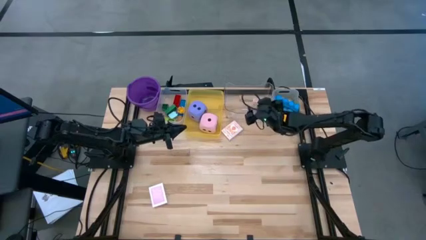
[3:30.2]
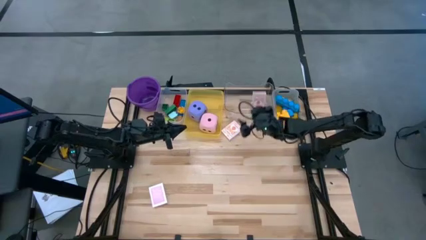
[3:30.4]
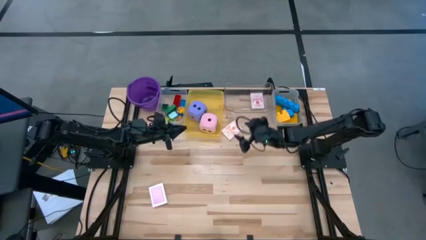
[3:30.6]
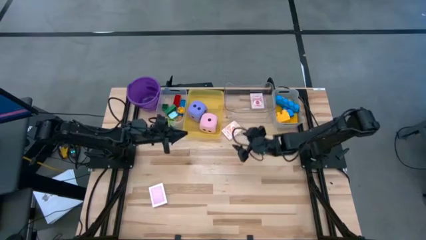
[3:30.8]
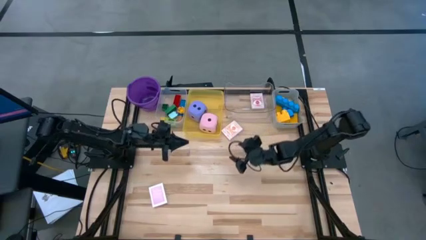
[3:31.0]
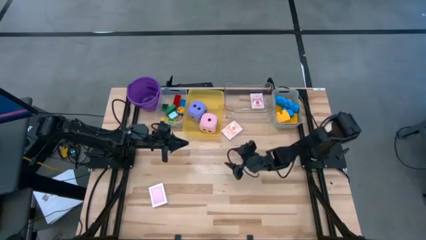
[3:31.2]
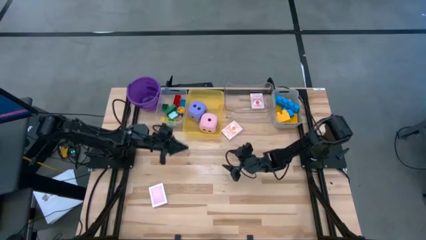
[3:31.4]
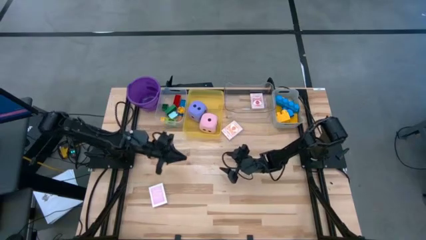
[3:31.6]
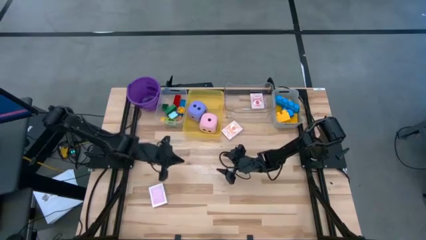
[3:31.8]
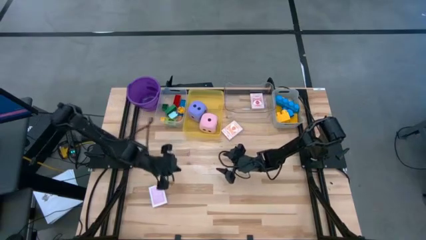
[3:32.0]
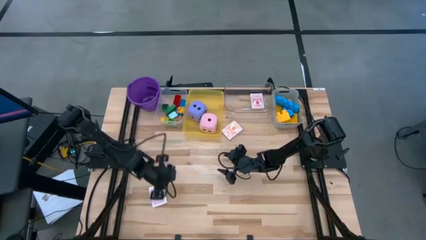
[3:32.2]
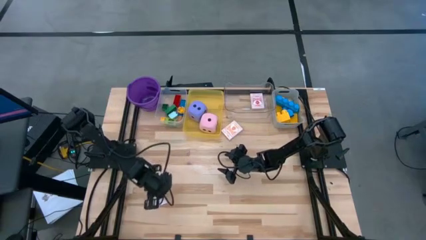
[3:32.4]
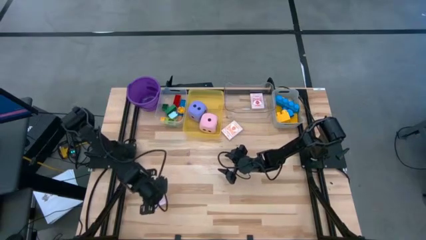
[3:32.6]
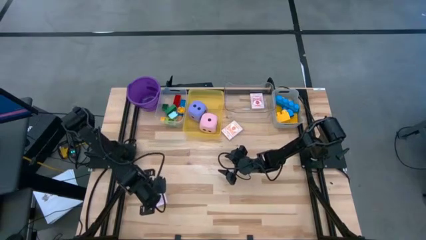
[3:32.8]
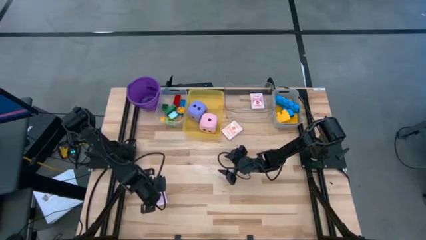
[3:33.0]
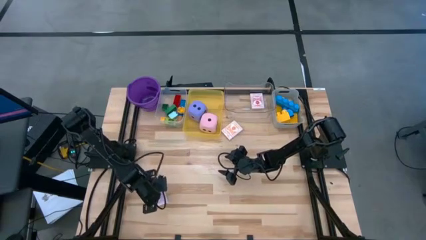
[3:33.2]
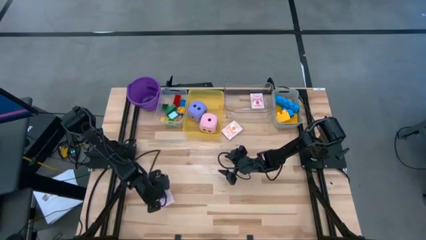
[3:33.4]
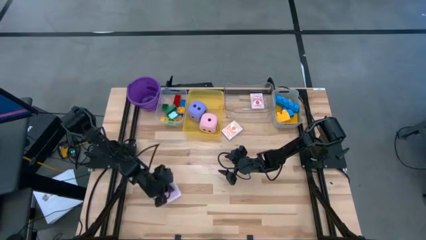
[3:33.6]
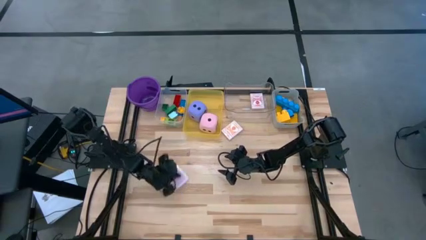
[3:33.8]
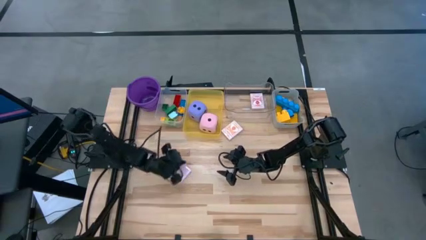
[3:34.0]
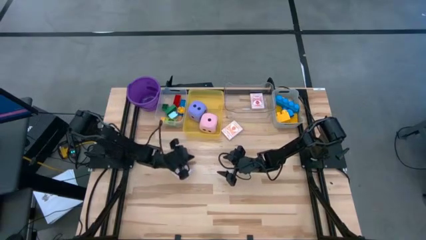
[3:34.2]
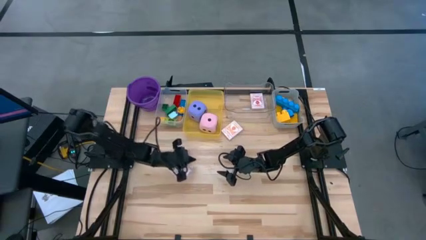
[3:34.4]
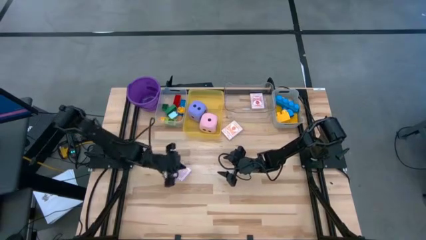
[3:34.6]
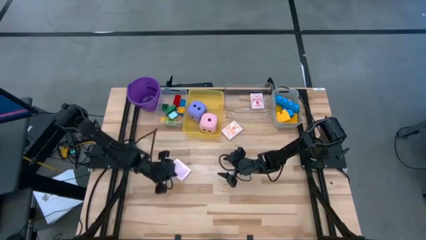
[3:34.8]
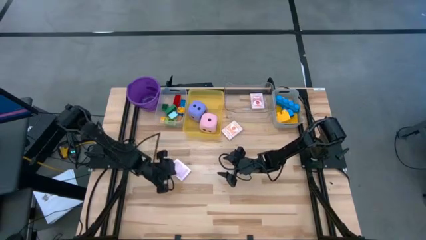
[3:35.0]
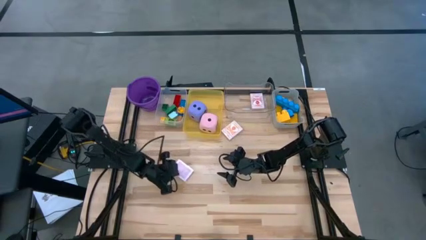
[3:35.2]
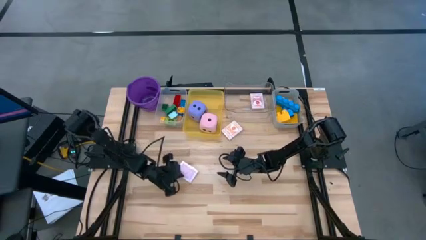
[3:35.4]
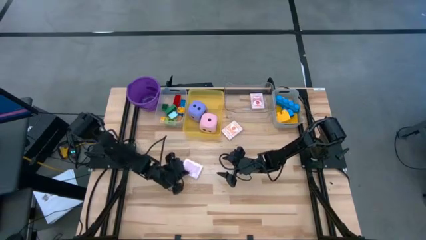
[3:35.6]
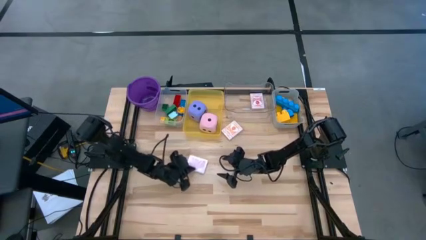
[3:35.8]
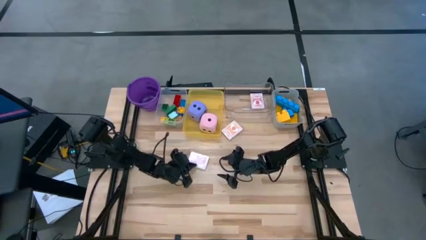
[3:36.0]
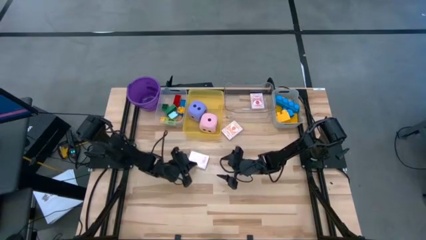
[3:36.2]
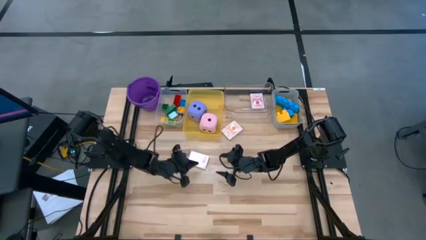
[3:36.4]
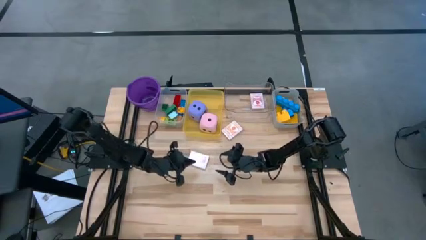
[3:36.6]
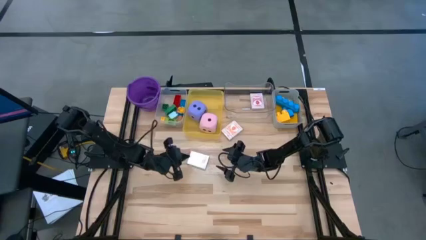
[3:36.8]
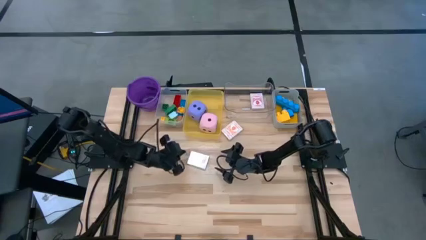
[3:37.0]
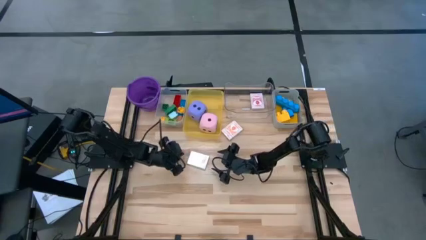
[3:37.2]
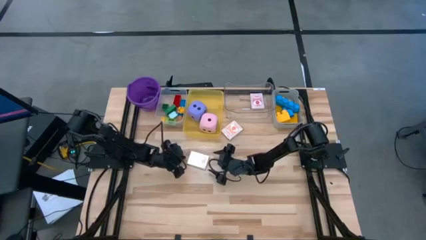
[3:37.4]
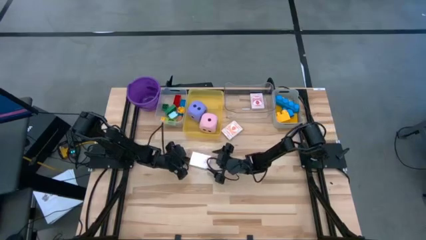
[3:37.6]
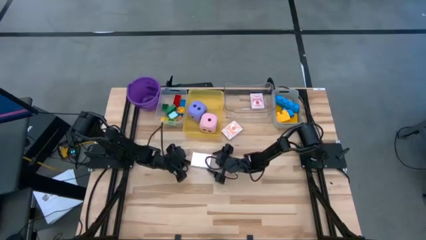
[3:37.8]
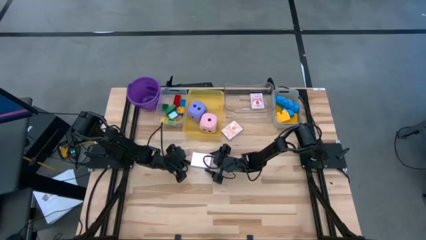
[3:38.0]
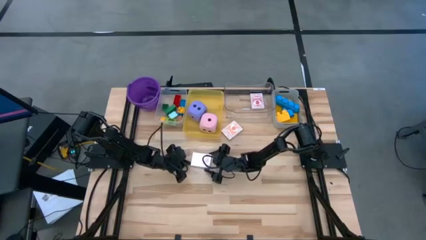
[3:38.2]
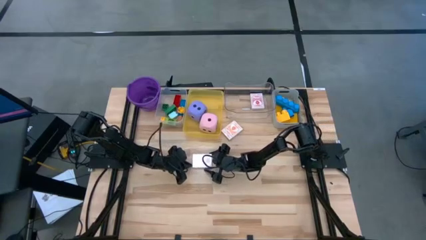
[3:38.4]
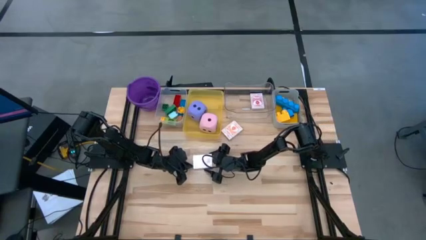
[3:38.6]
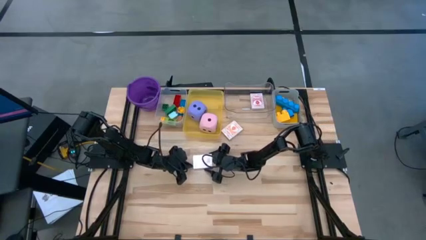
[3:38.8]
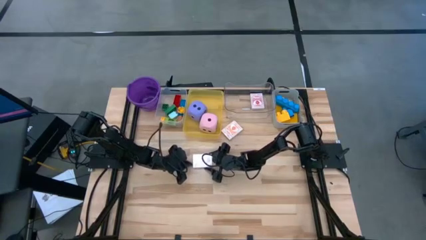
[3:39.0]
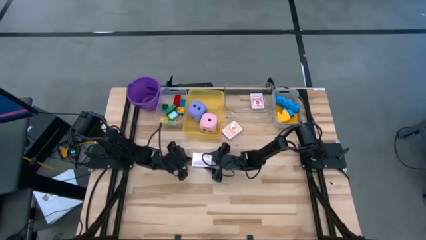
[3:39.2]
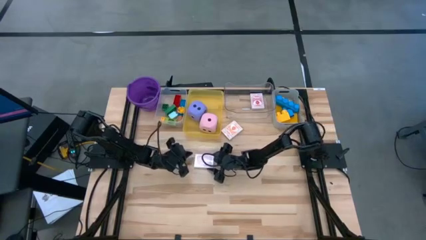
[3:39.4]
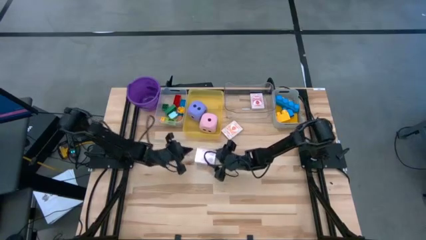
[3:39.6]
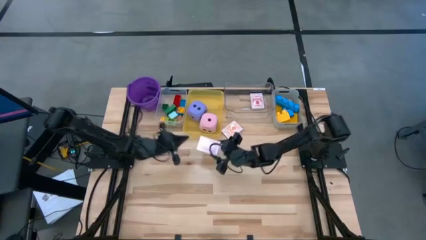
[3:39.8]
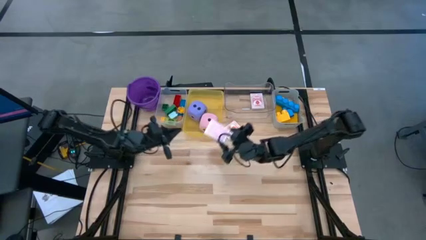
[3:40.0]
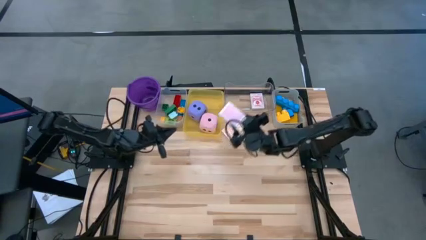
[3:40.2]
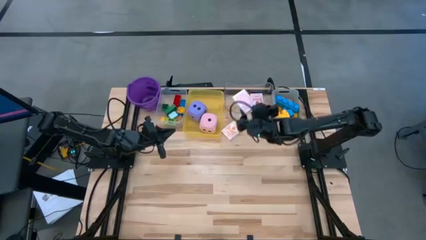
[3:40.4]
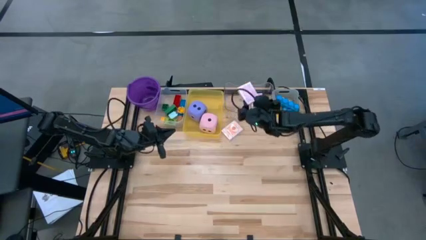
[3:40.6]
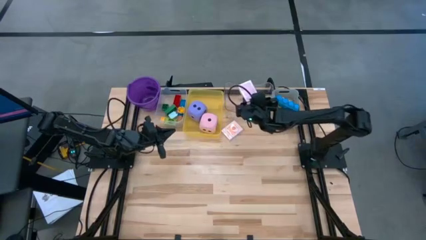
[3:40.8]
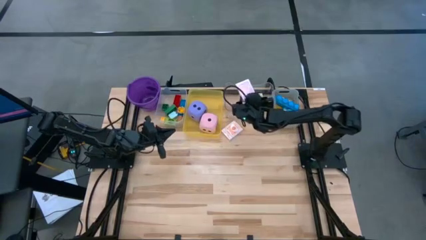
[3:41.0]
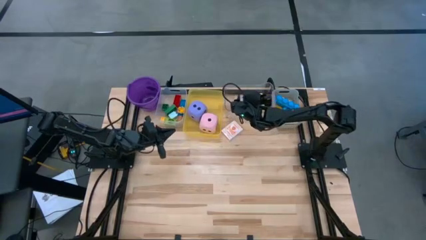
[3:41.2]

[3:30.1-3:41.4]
Task: Pick & Place Toys
Put the pink playing card into the transparent bin

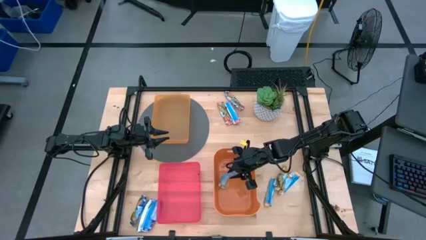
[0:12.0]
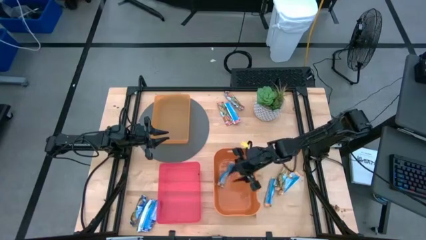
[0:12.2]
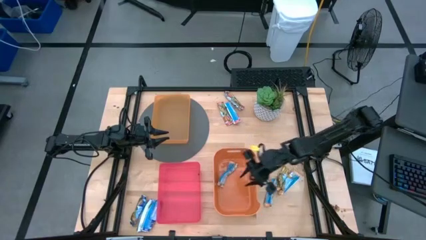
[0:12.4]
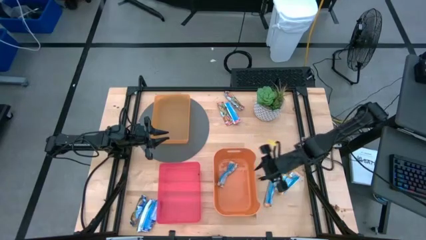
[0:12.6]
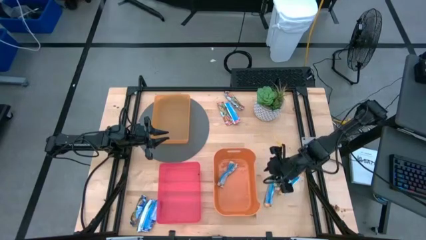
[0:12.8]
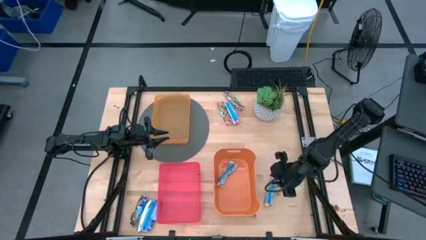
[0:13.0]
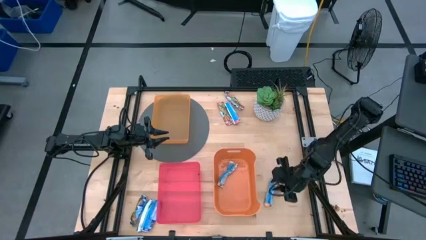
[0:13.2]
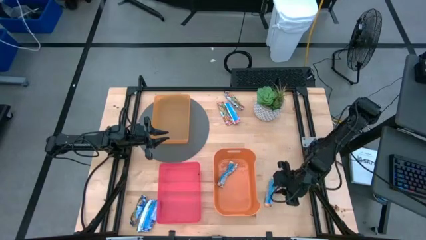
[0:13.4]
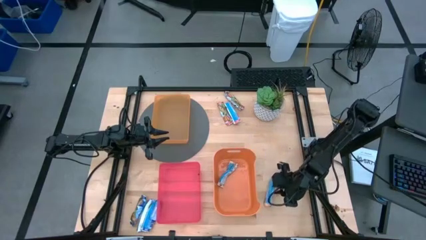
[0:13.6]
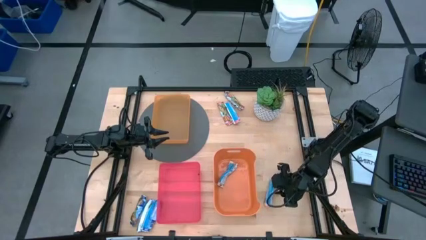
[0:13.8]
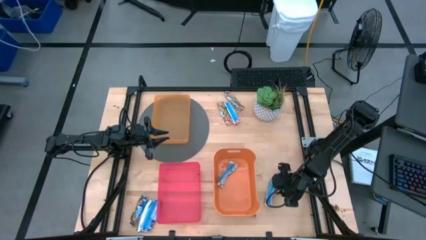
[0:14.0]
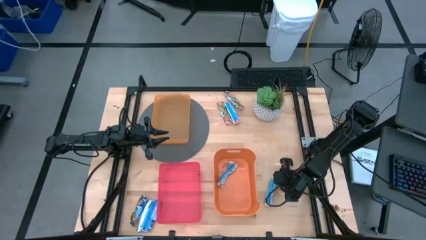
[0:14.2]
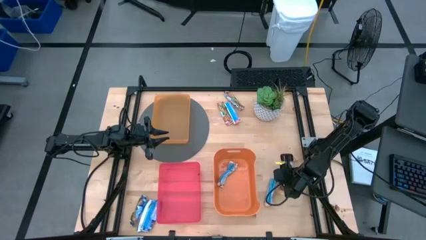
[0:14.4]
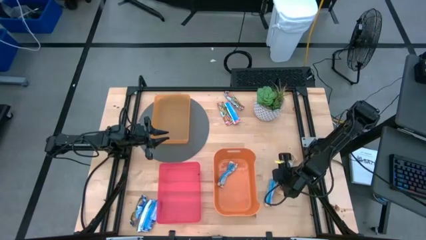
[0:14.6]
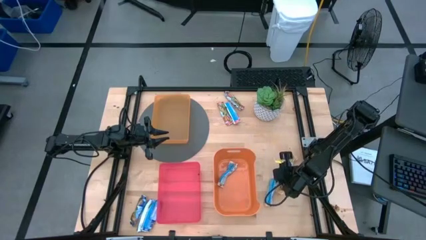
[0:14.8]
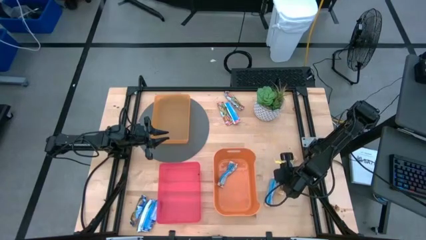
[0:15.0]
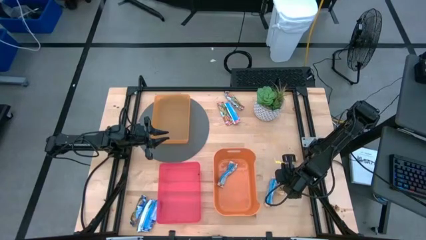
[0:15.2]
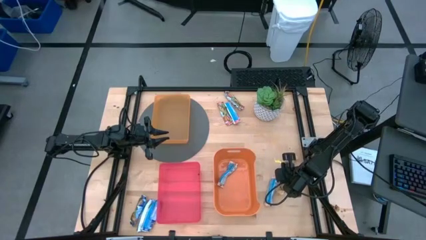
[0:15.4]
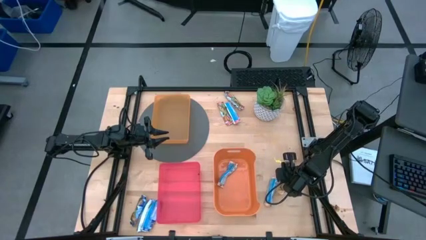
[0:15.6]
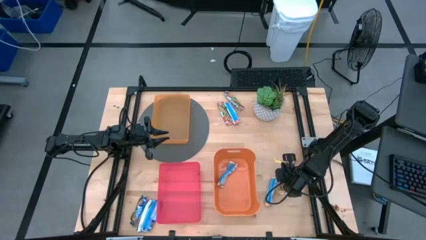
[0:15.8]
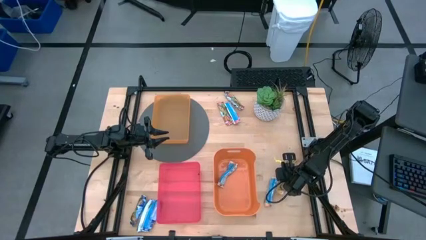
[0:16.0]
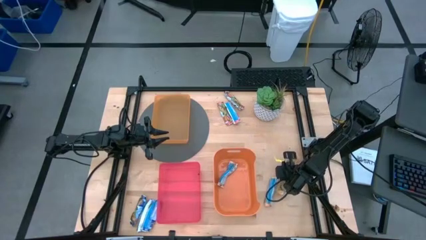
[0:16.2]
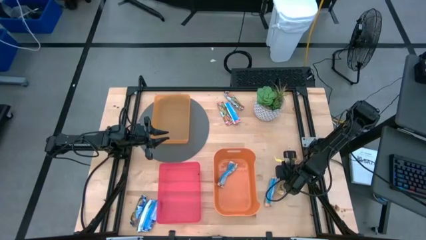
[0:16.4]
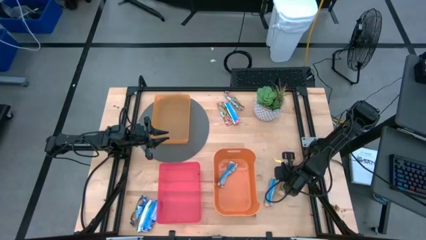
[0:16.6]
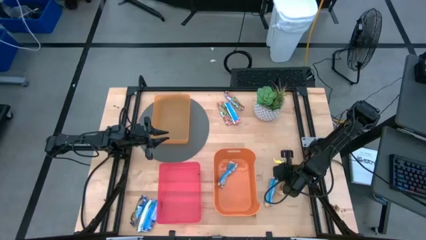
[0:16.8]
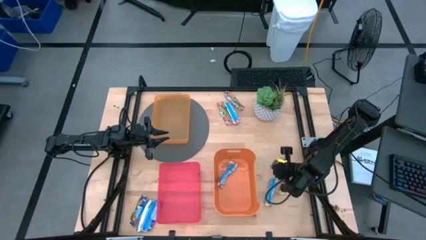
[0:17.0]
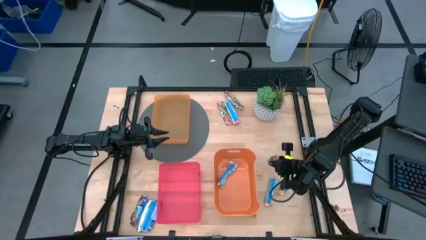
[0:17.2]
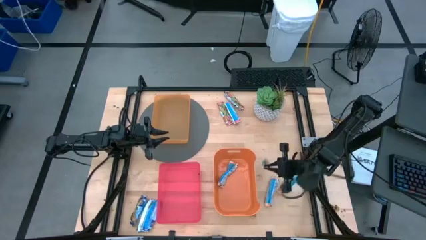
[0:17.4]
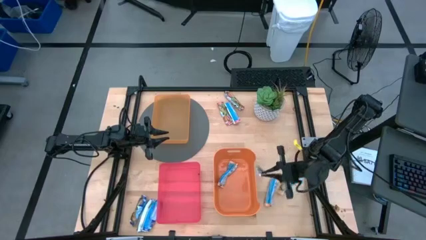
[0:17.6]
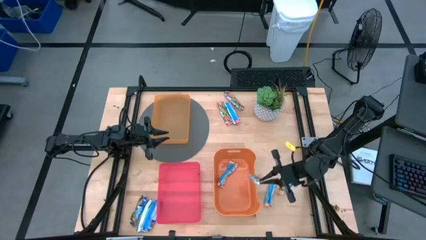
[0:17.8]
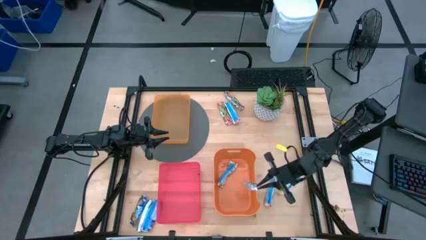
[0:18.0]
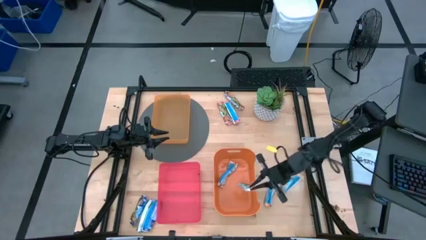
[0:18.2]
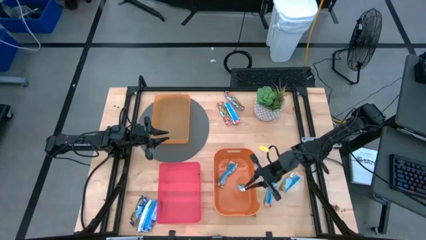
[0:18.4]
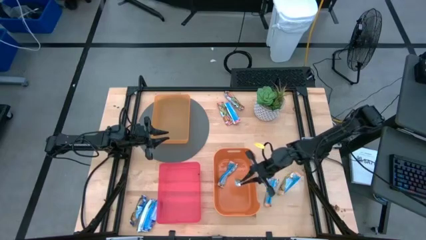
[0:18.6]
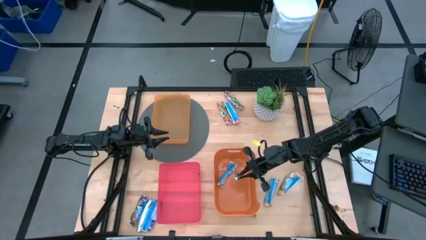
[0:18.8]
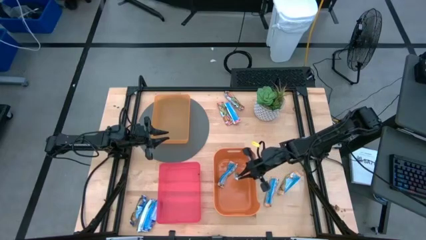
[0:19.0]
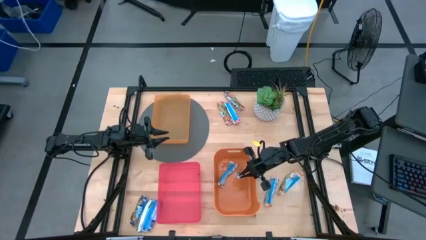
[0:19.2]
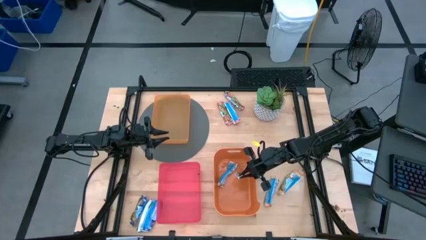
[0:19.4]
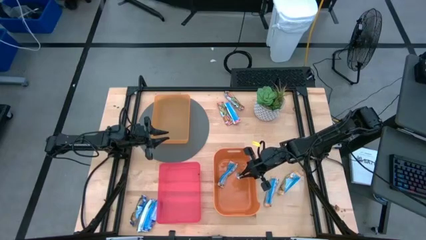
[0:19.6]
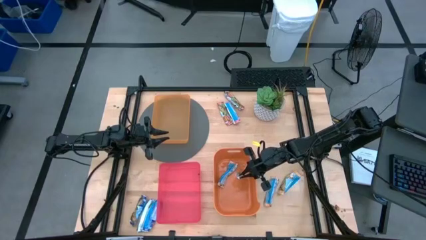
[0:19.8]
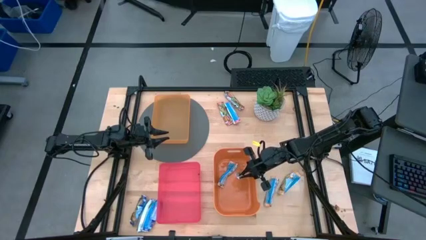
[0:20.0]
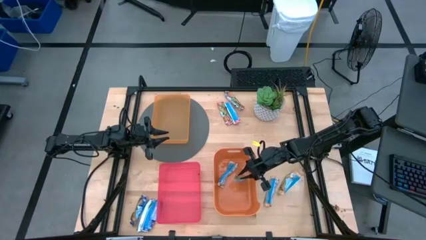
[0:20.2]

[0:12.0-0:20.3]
Task: Pick and place Granola Bars by type
Put the yellow granola bar into the orange bin
